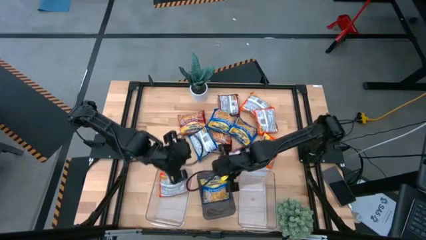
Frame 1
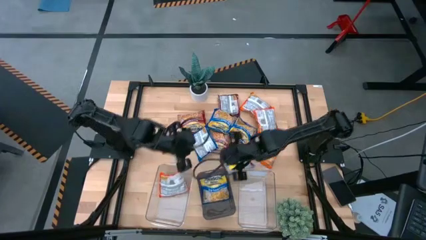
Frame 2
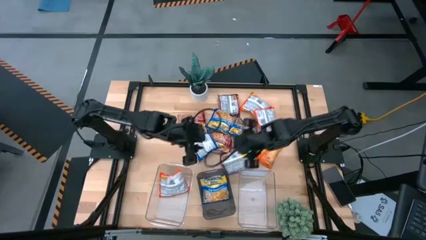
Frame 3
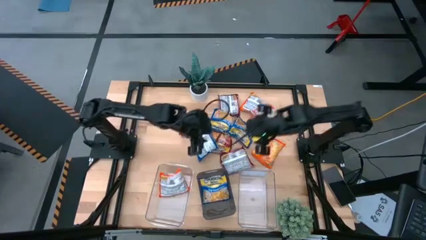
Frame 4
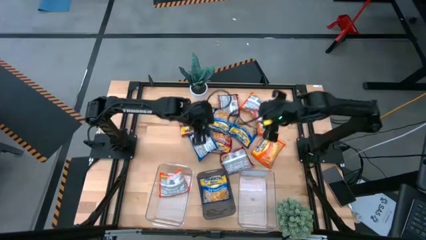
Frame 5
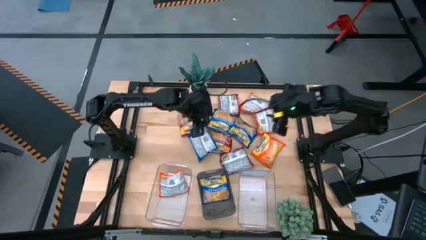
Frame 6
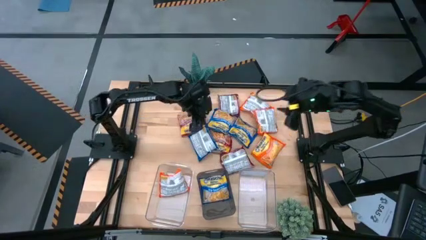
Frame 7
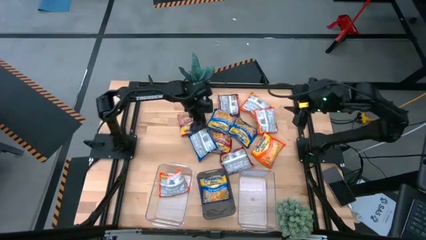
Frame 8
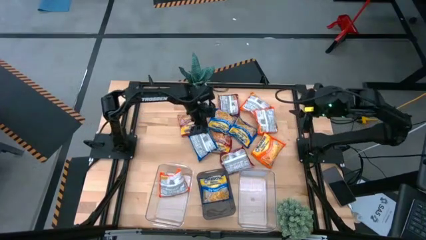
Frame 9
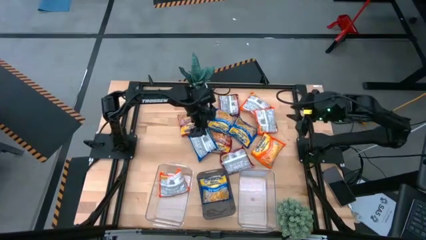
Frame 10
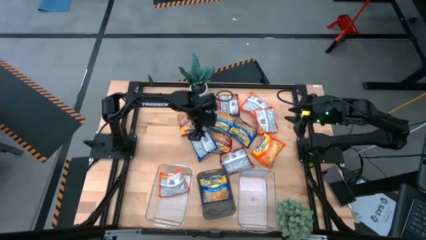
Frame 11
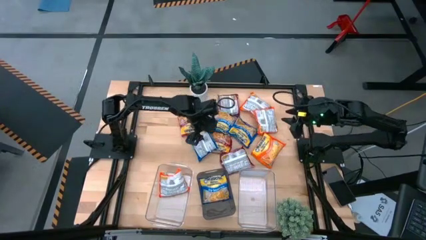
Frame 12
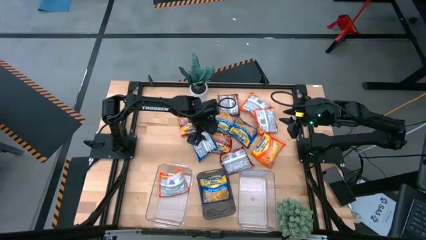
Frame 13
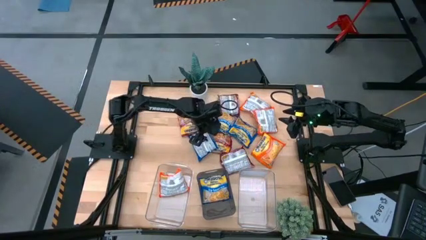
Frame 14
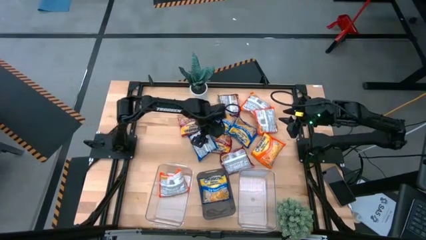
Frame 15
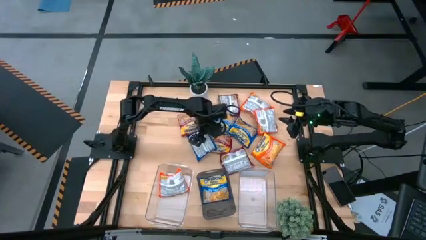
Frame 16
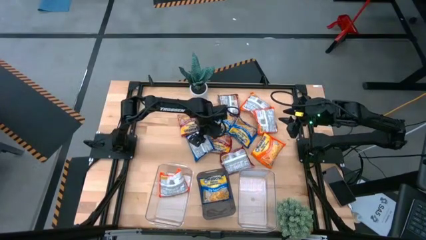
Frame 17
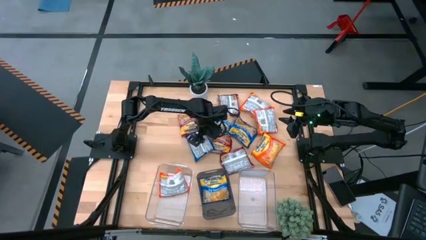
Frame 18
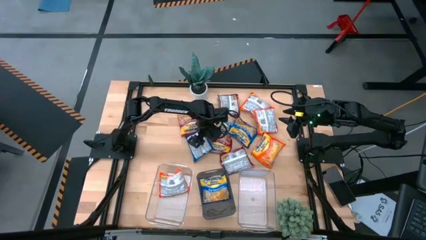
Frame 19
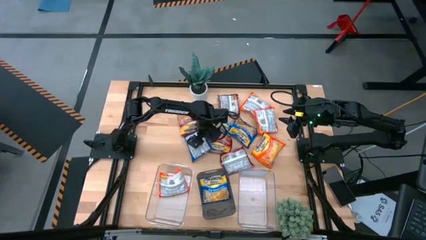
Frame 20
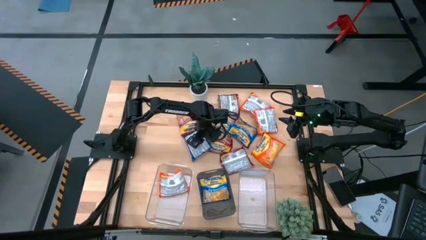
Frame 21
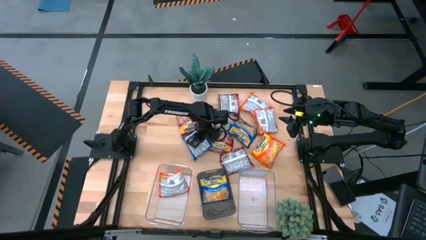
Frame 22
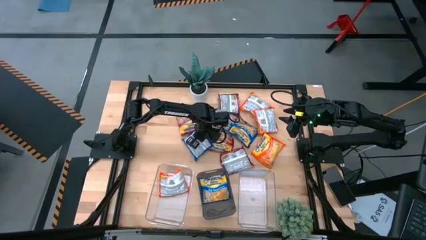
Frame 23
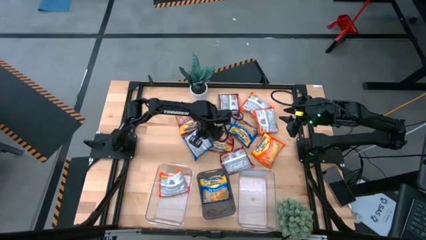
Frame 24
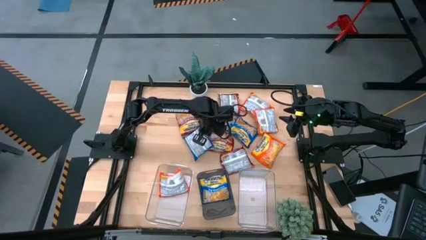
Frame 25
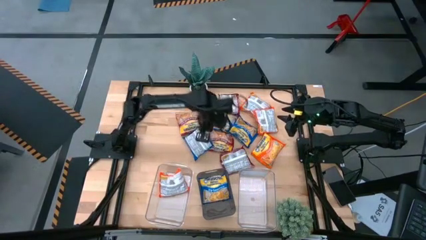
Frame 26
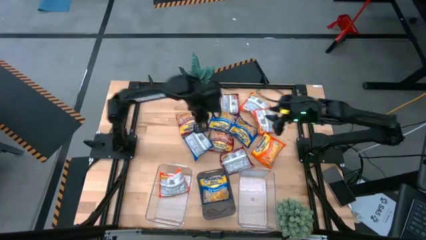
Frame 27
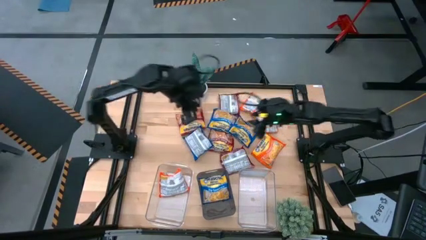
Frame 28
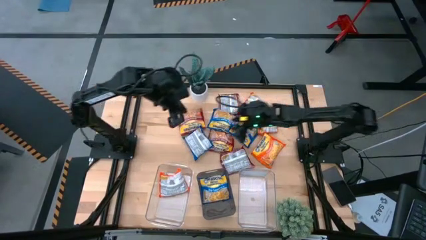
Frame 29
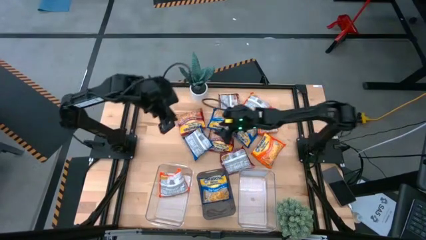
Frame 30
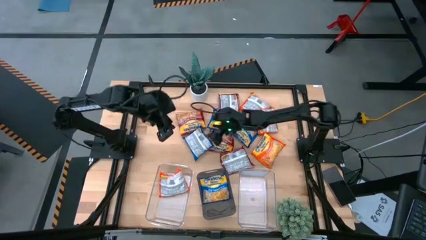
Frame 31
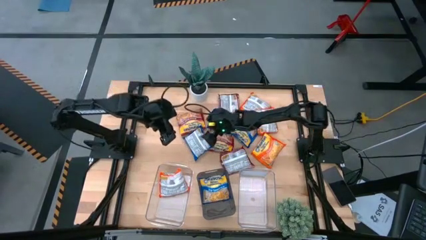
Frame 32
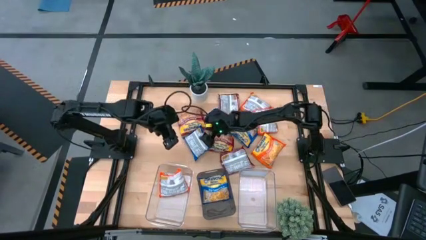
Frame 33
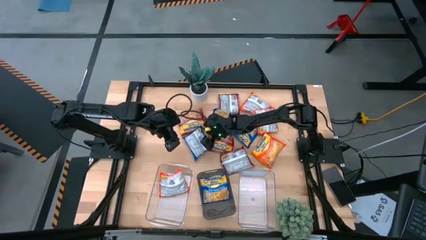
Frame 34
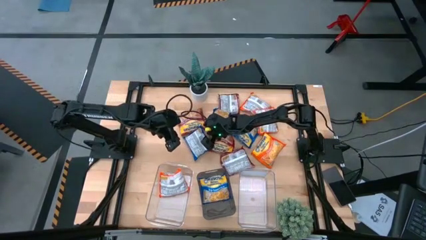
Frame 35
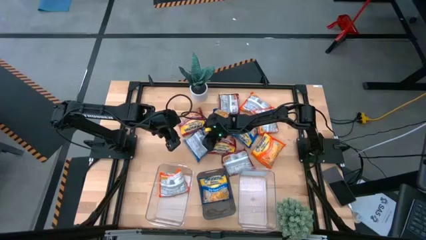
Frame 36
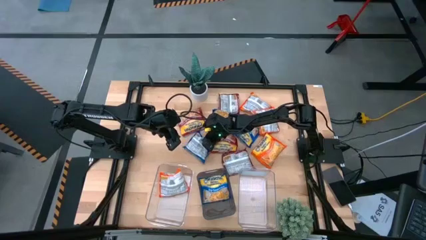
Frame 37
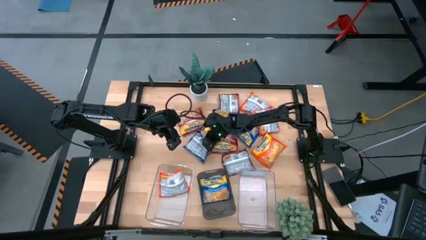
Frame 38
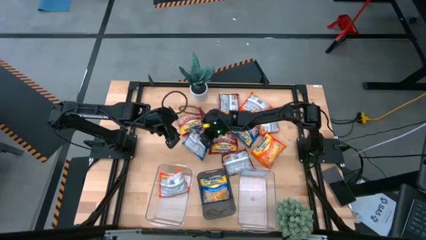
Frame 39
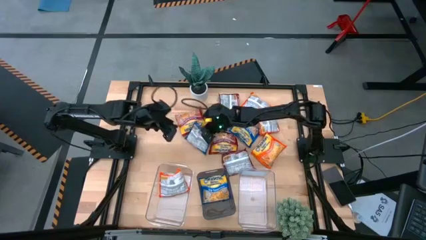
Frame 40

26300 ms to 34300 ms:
Task: Sort Maruchan noodles
Put the blue noodle pack into the black bin

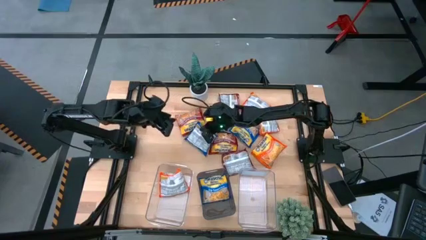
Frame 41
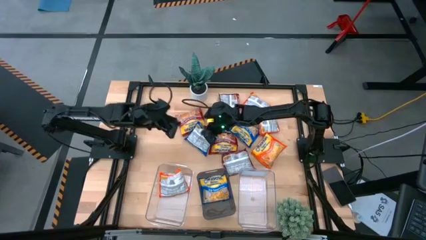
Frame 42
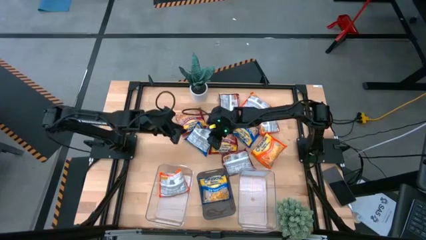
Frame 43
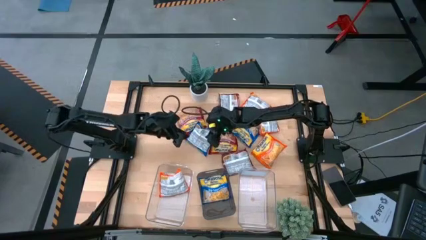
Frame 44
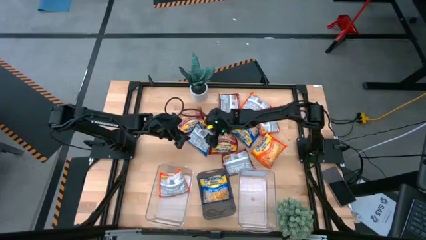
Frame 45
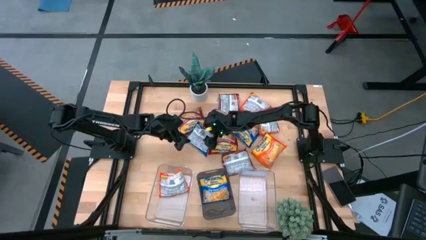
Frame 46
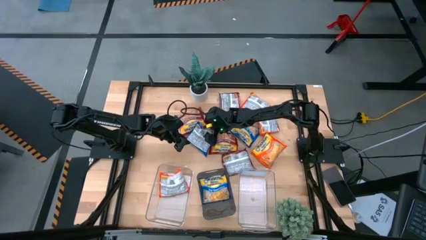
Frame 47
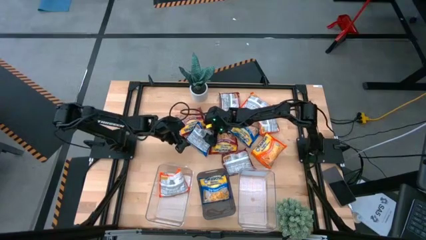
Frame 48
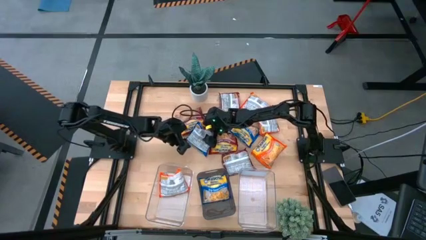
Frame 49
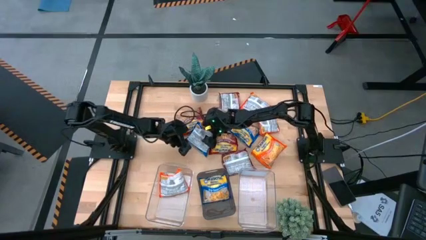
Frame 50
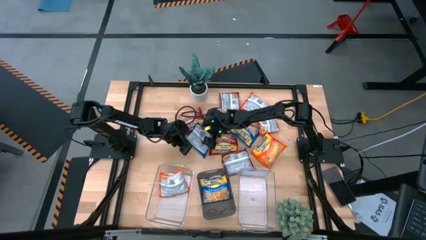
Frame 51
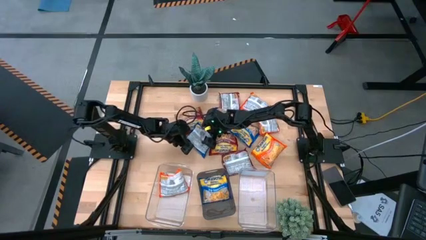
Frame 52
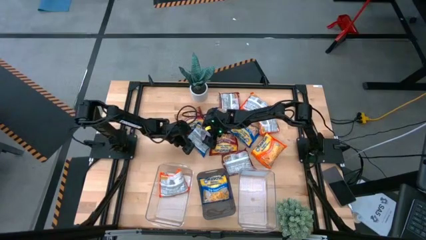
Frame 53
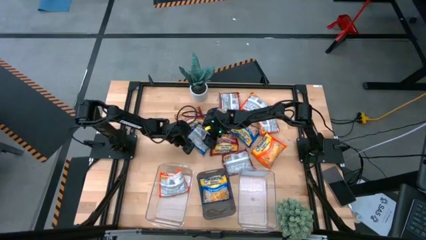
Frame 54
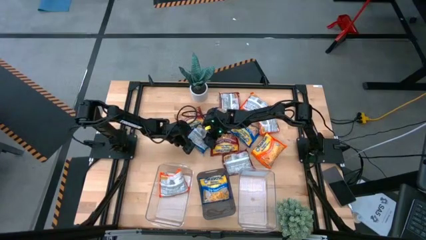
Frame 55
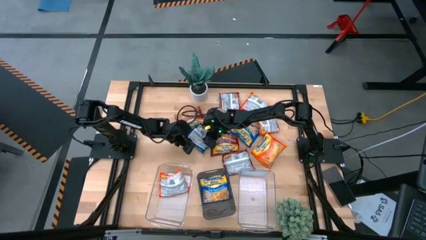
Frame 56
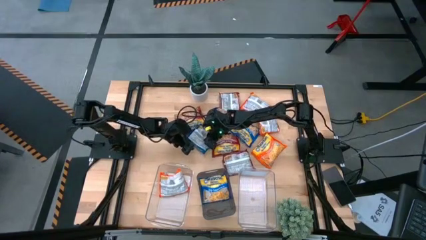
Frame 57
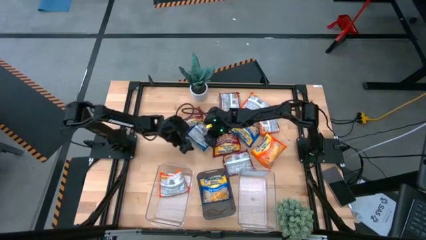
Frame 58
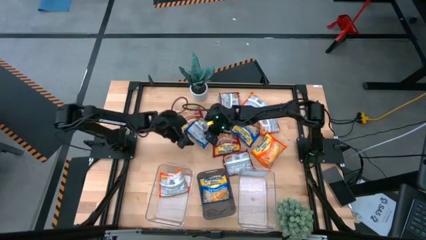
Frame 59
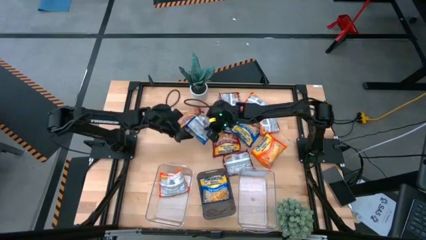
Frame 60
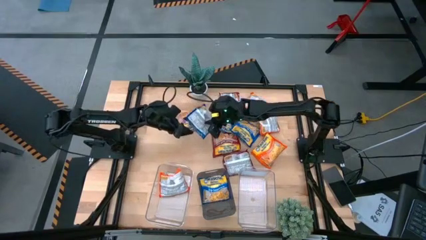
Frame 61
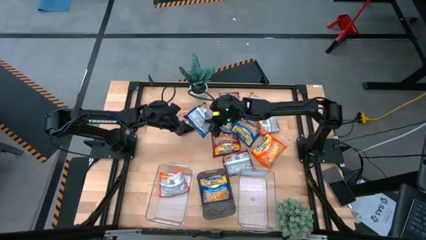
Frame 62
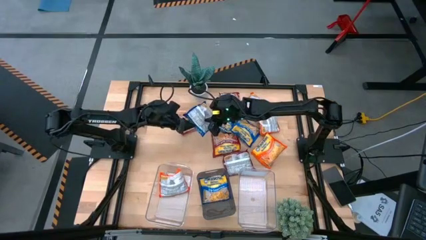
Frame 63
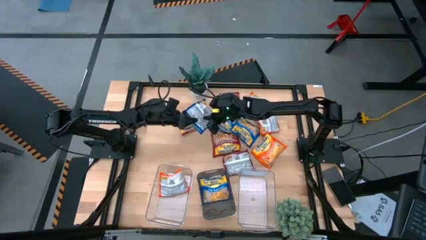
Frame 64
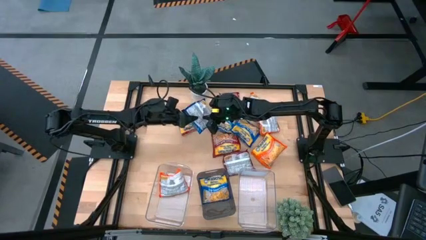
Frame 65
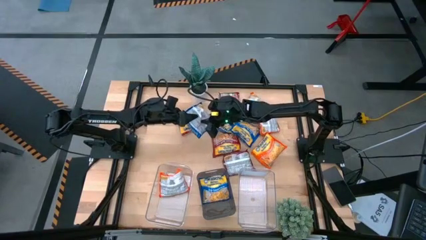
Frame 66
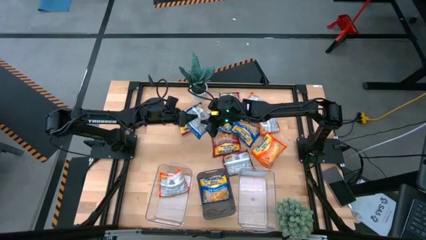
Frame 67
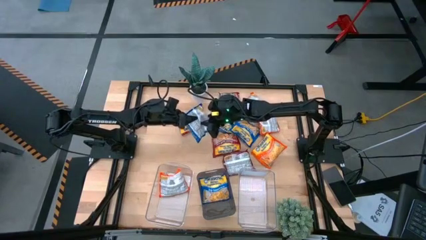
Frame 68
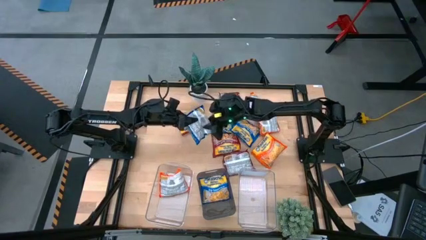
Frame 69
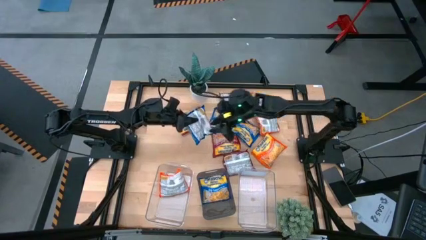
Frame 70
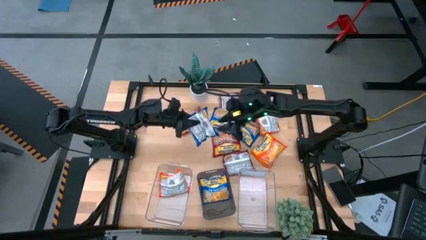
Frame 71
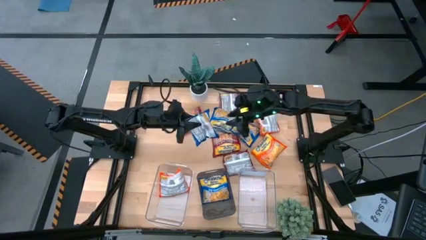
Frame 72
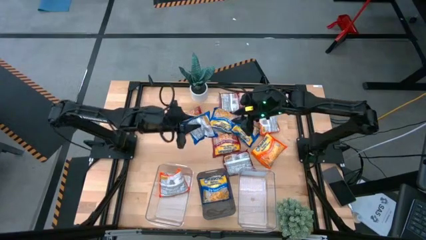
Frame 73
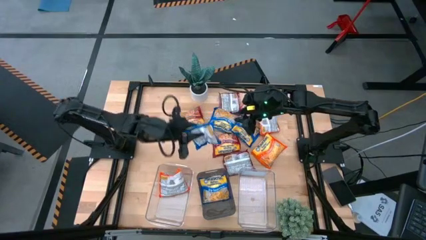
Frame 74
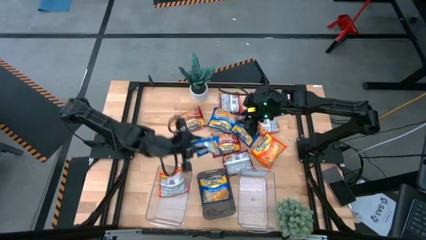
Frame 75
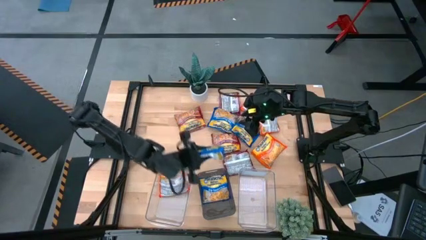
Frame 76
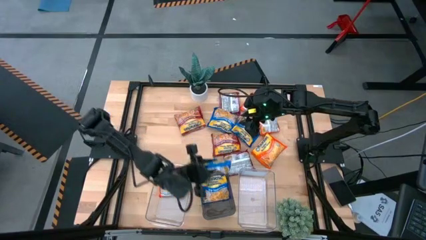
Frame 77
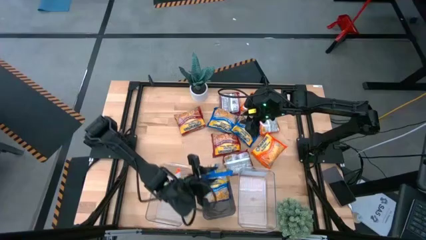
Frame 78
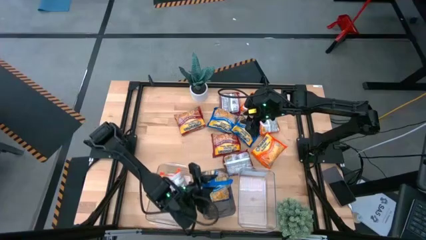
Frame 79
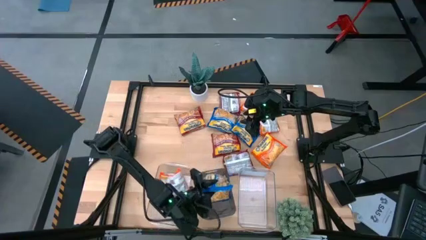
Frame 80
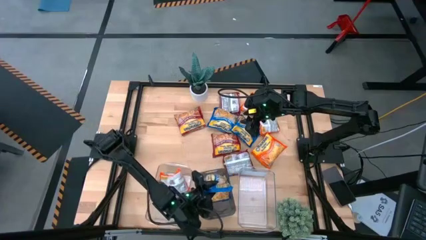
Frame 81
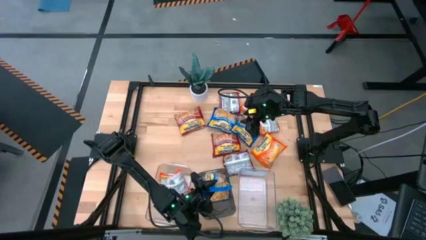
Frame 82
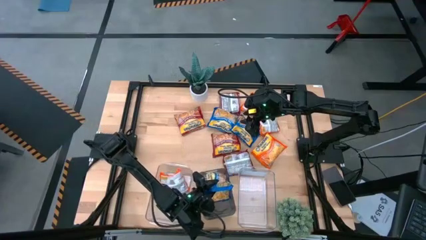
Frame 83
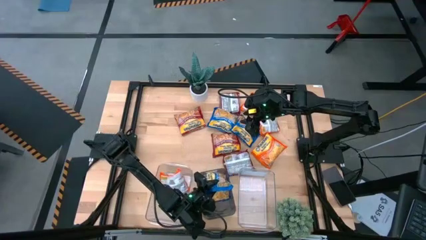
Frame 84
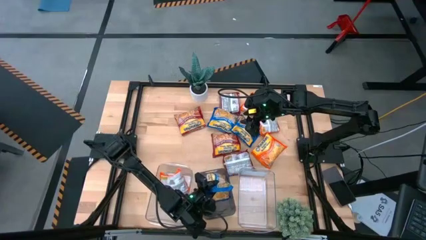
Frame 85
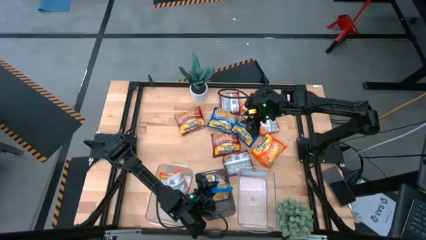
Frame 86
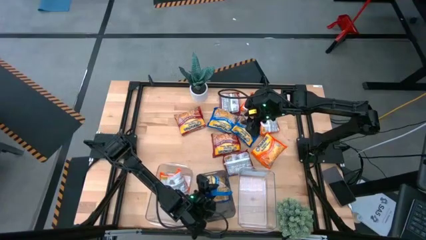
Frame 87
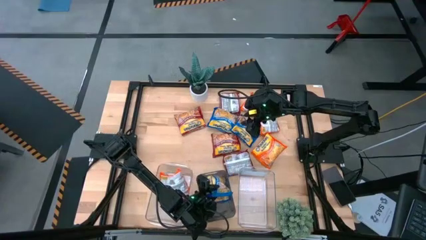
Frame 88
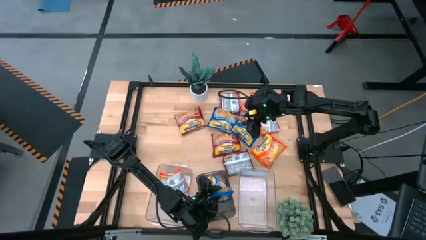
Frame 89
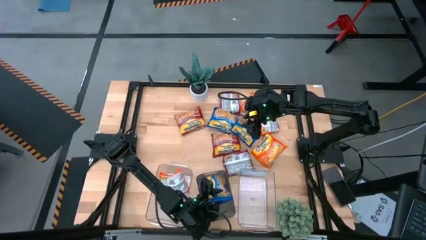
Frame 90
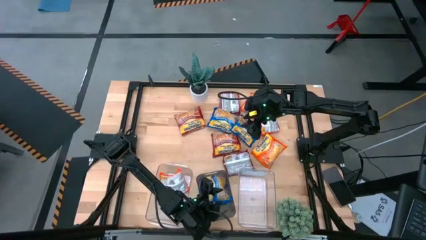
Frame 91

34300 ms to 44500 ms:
Put the blue noodle pack into the black bin
